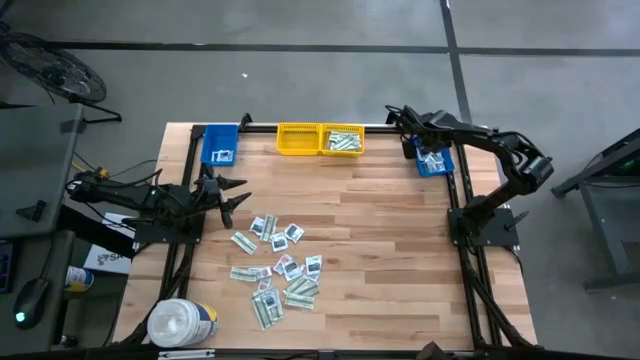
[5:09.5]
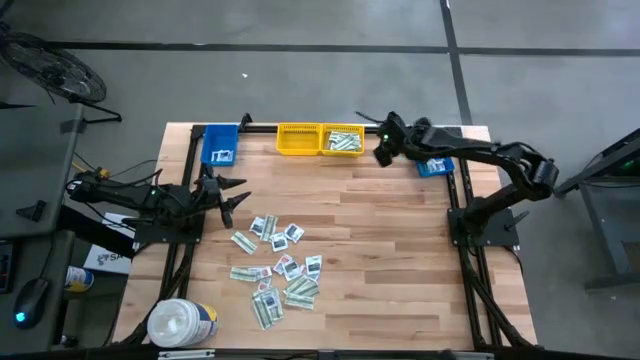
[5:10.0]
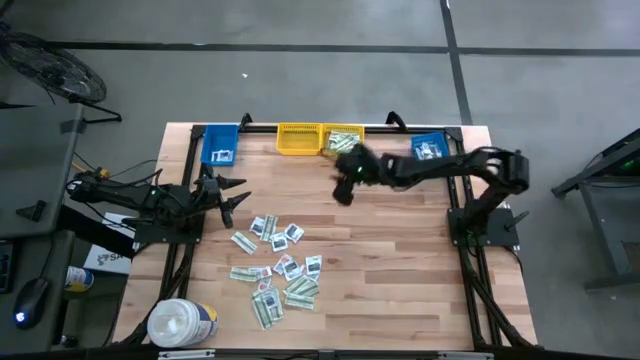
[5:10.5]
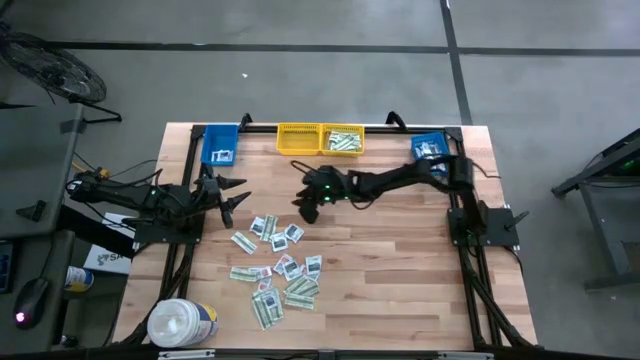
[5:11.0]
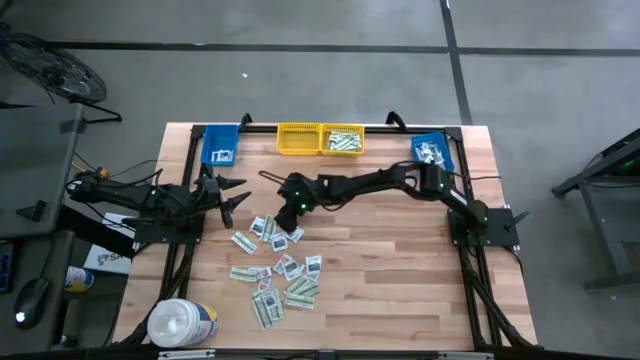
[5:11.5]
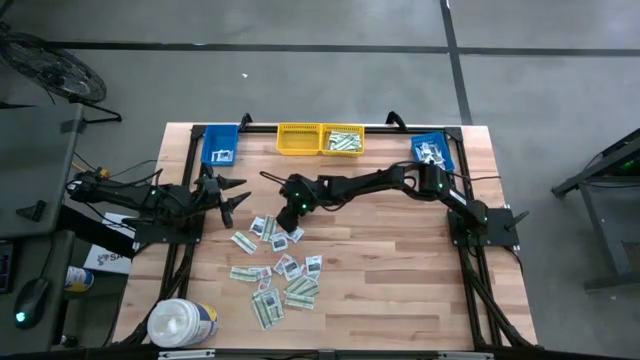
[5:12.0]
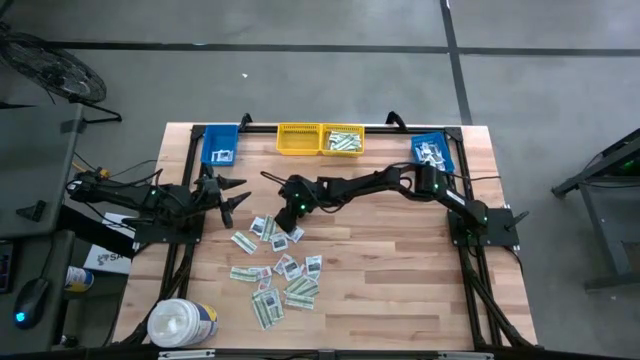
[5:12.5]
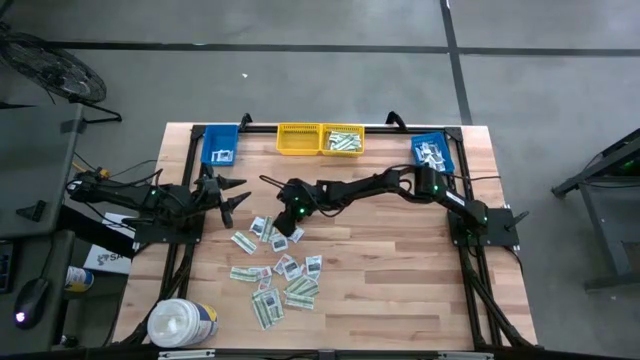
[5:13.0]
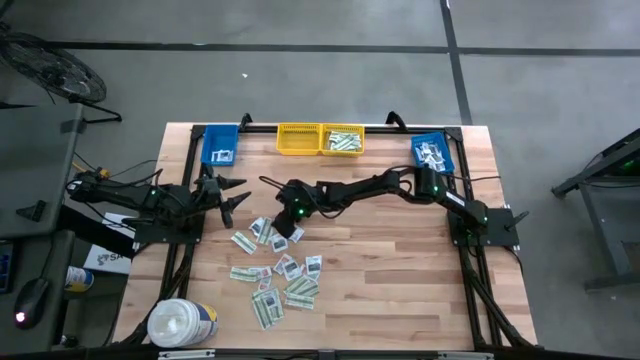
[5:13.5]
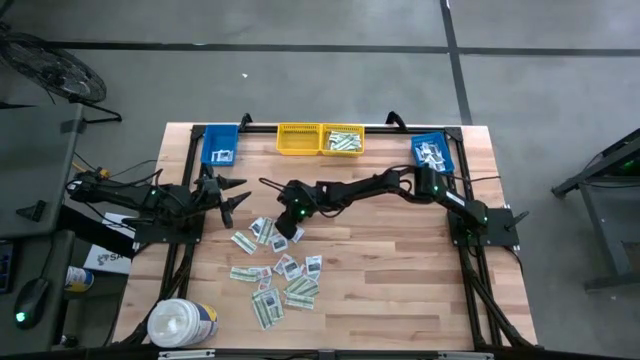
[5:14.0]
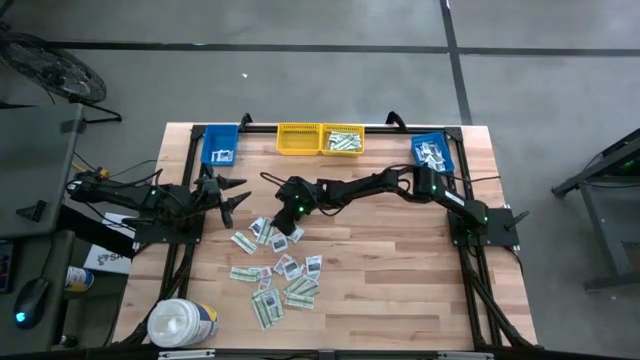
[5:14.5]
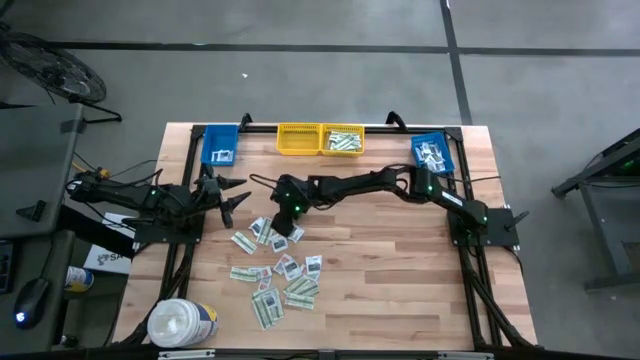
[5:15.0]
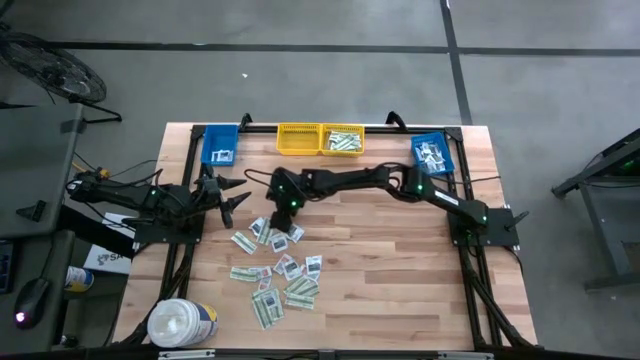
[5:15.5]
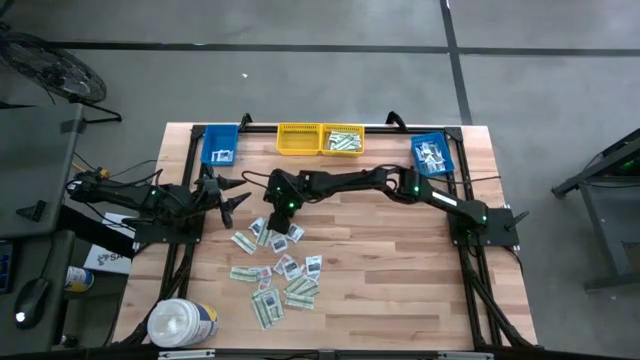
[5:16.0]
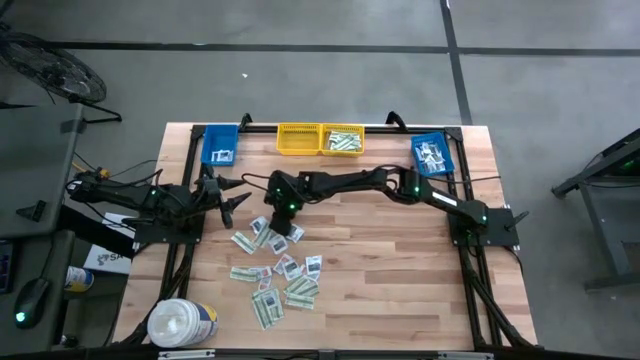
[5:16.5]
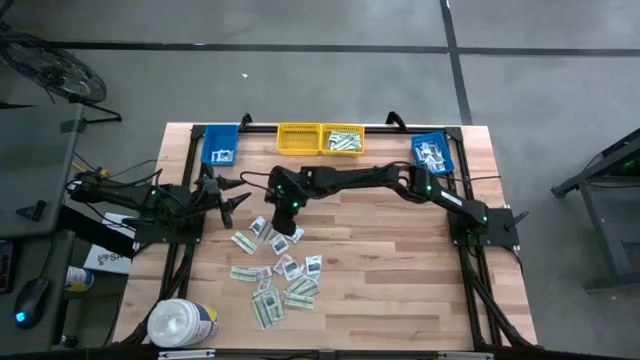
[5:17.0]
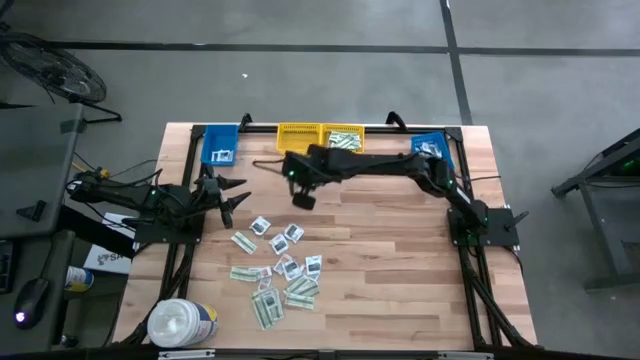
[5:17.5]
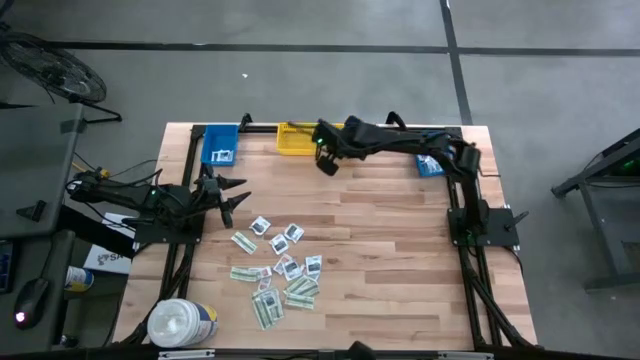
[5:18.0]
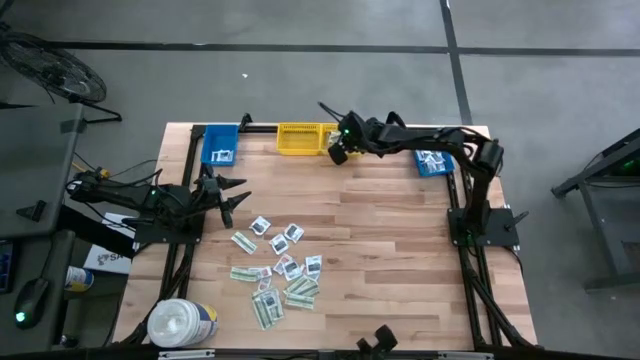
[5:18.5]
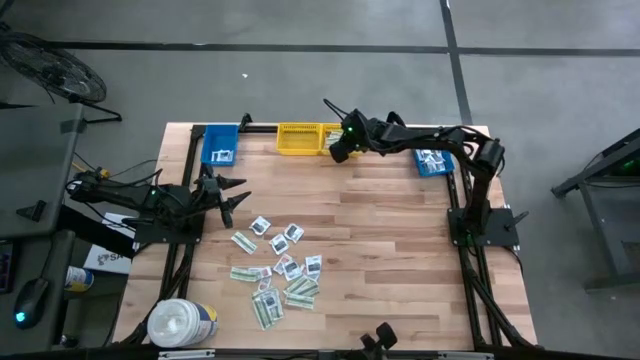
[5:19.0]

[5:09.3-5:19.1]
Task: Pick & Place First Aid Supplies
Put the green bandage pack into the right yellow bin

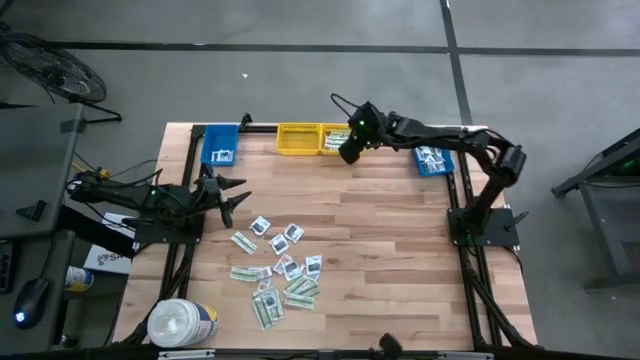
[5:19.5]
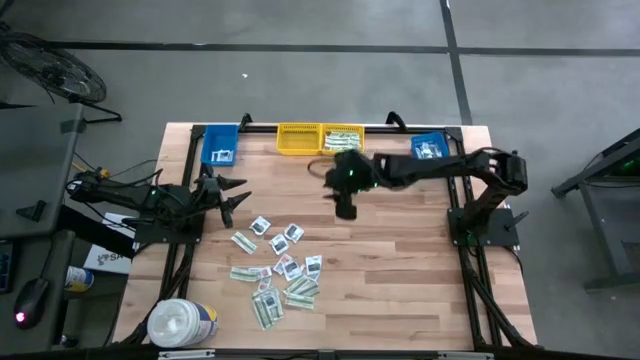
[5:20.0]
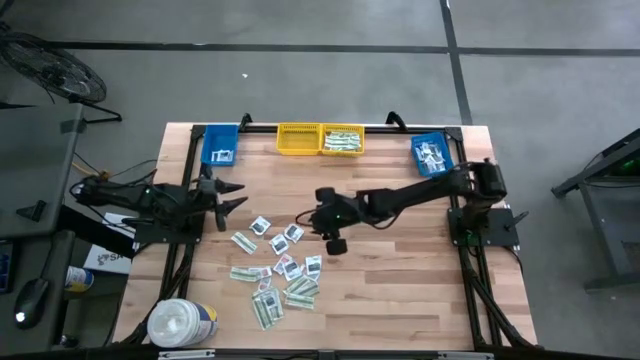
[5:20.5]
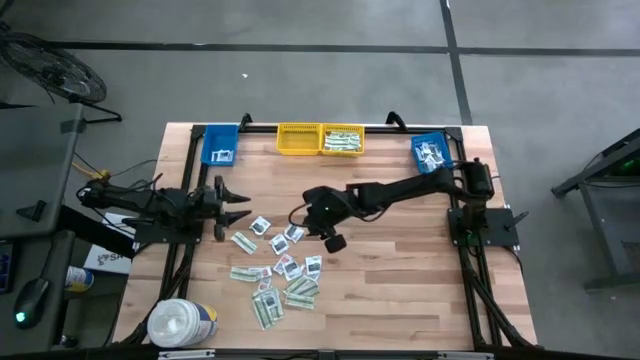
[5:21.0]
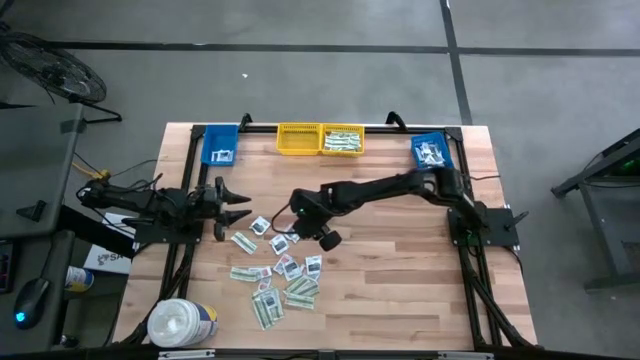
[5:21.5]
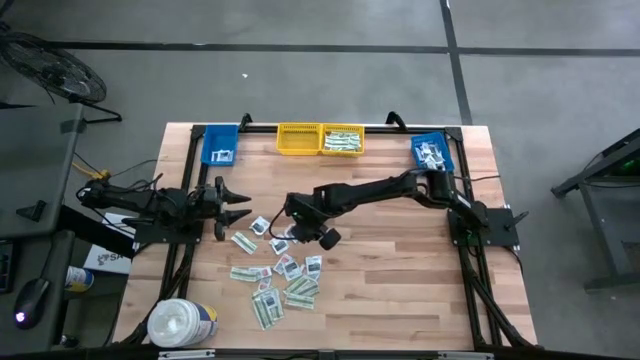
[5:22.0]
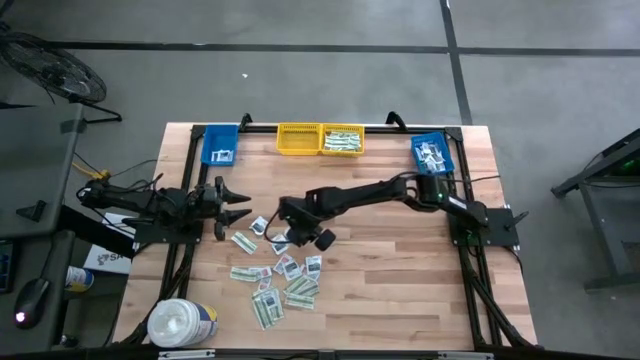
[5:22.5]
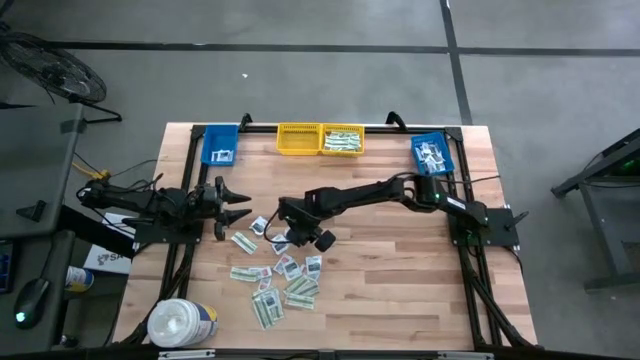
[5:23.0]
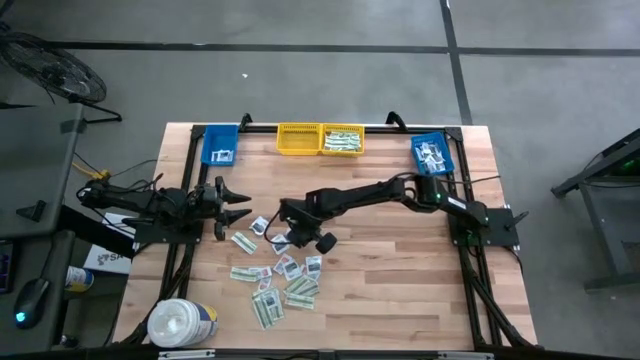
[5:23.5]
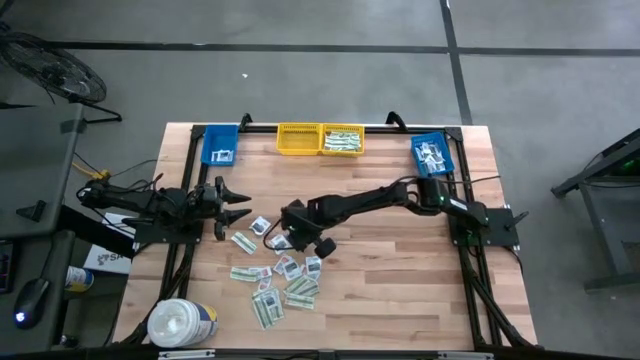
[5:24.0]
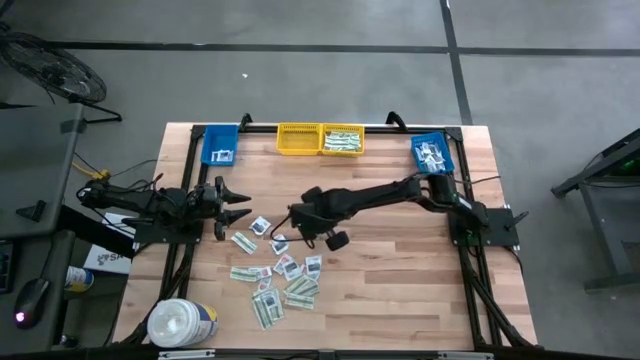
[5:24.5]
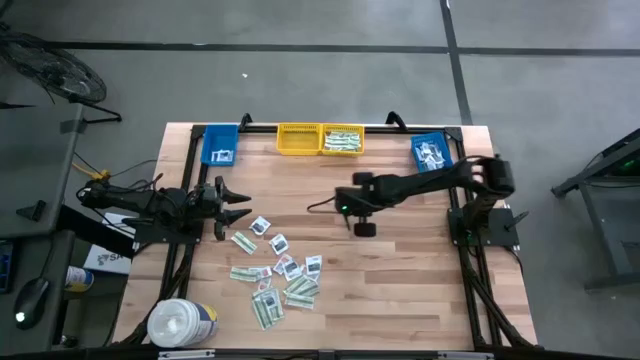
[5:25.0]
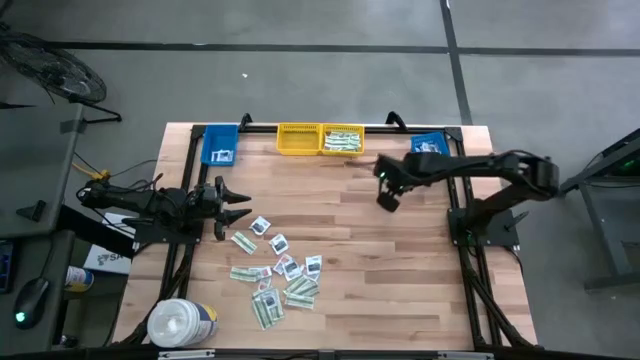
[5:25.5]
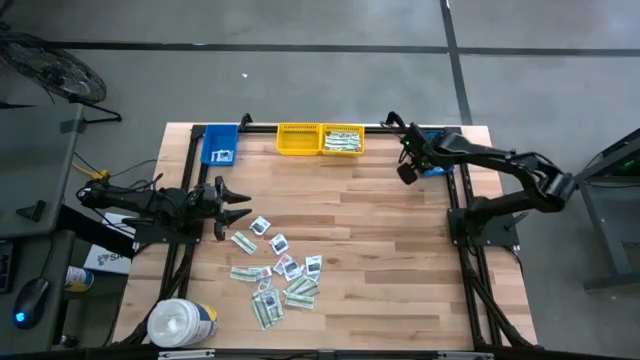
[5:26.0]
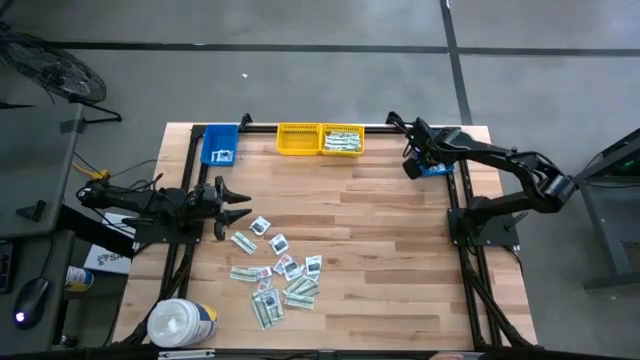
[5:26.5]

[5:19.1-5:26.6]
Put the black towelette pack into the right blue bin

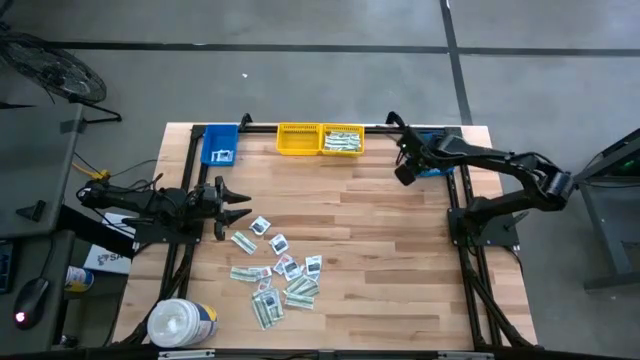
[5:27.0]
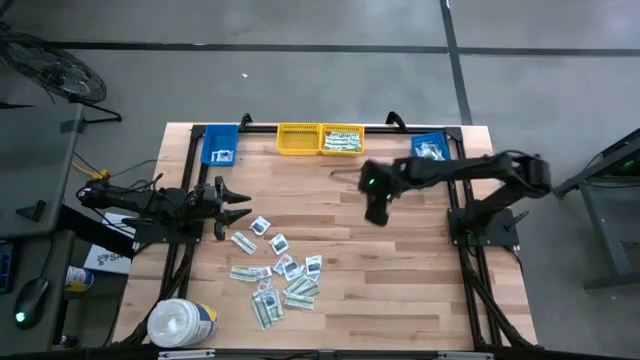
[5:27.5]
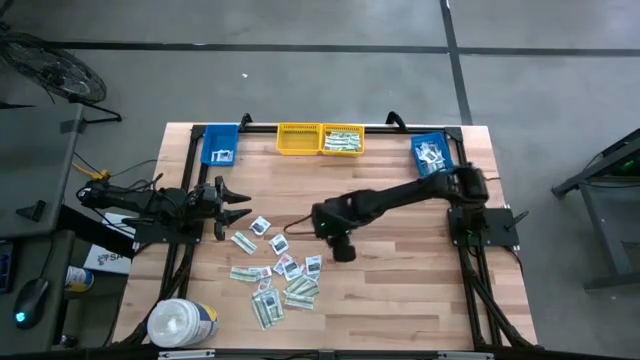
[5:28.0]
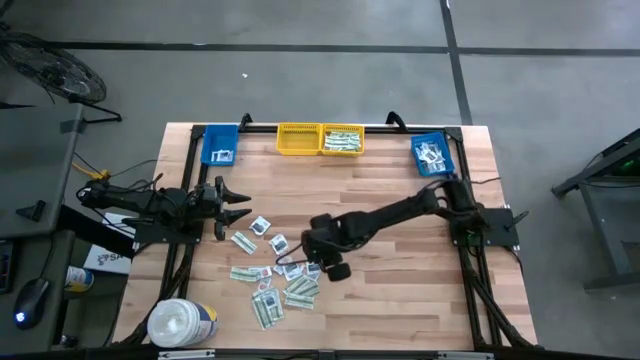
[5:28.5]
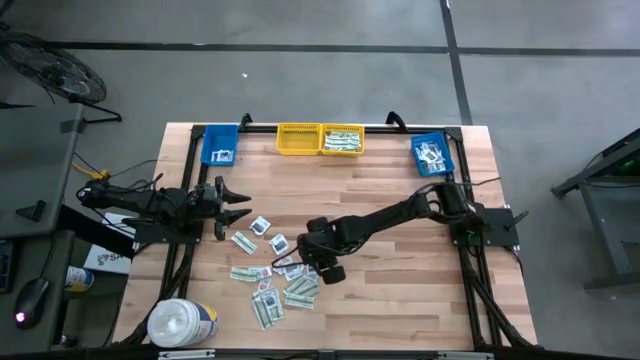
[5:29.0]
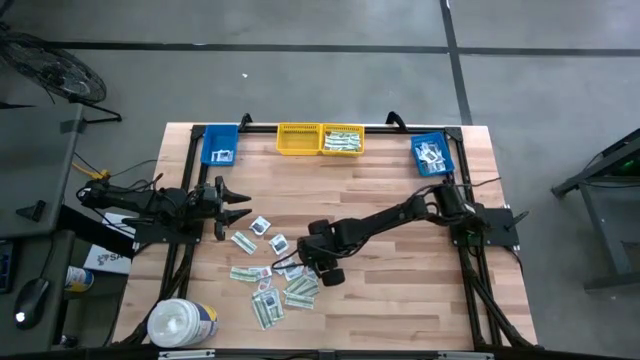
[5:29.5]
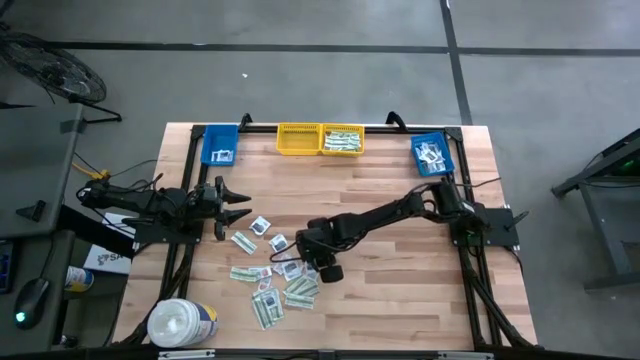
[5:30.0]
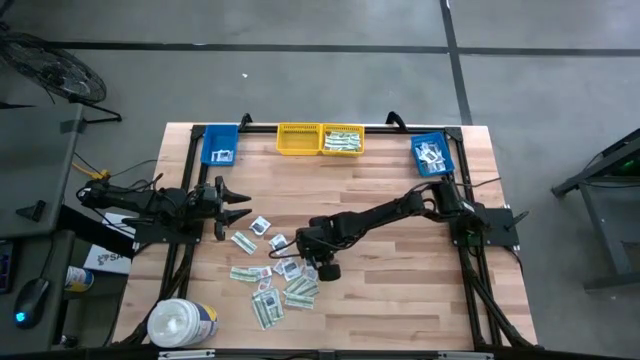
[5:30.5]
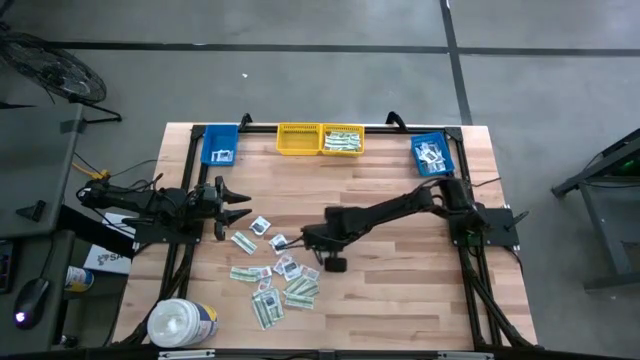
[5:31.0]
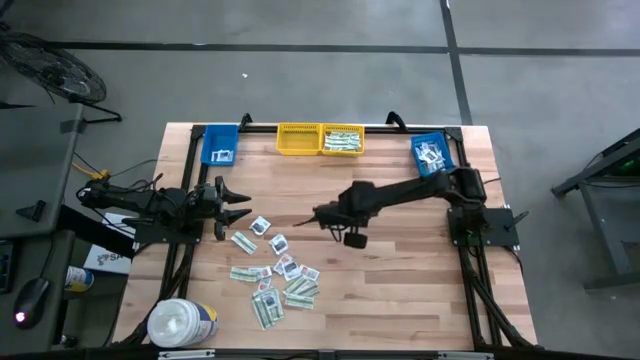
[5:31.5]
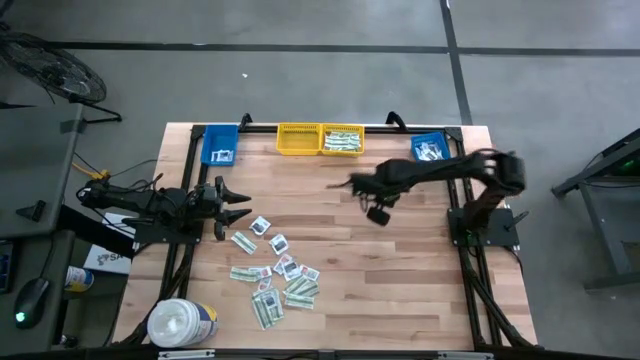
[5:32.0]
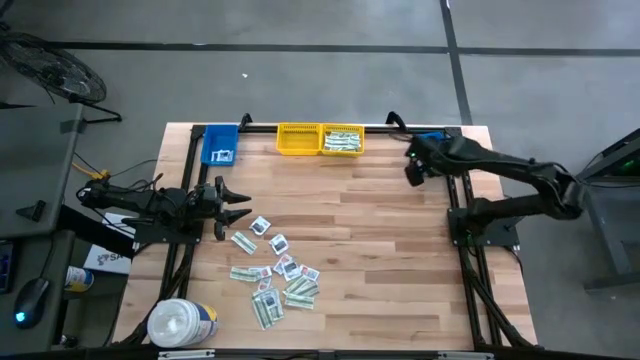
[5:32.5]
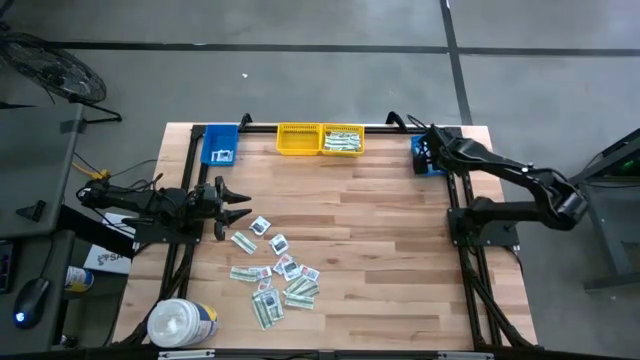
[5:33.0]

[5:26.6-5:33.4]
Put the black towelette pack into the right blue bin
